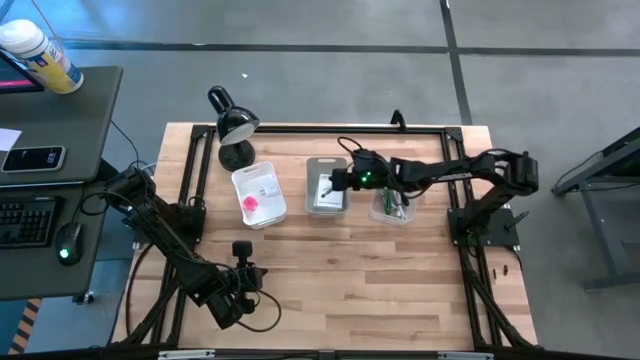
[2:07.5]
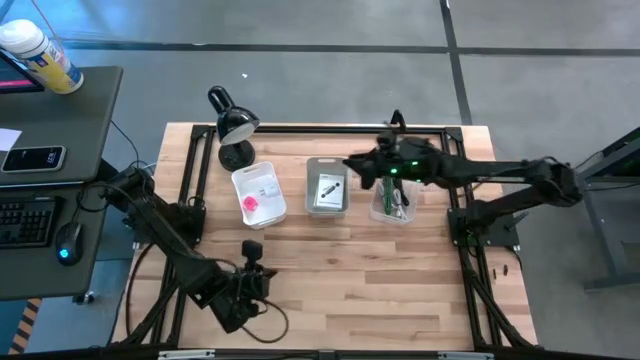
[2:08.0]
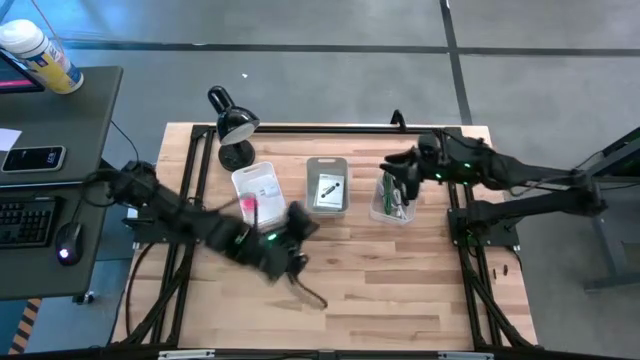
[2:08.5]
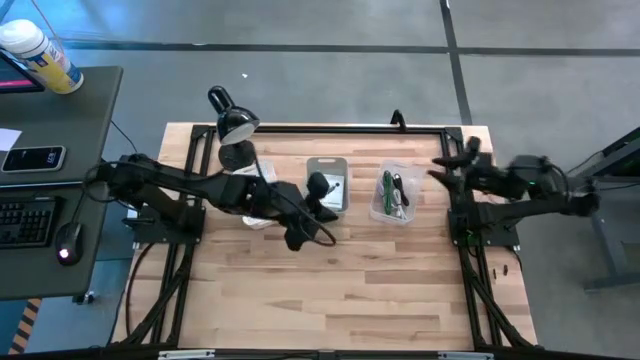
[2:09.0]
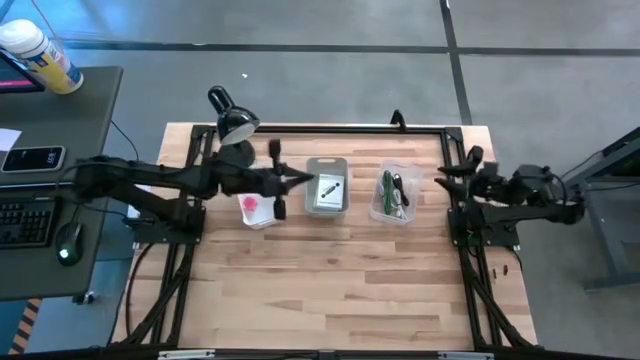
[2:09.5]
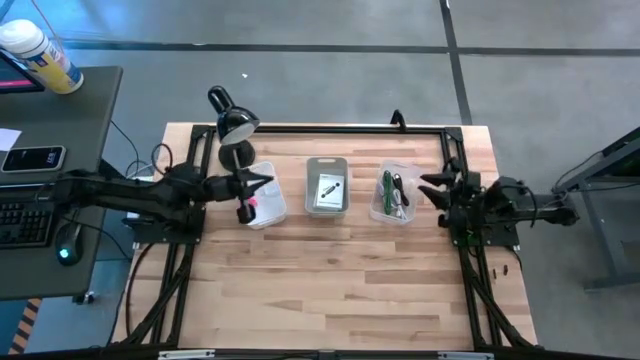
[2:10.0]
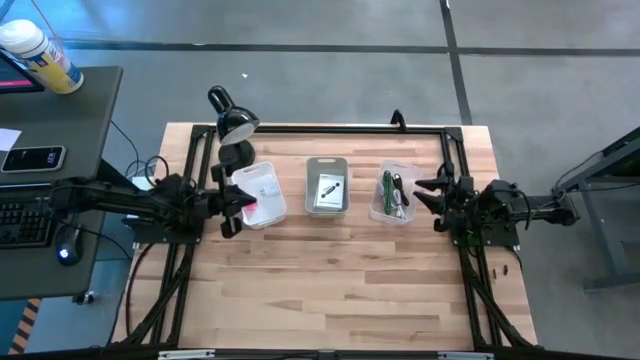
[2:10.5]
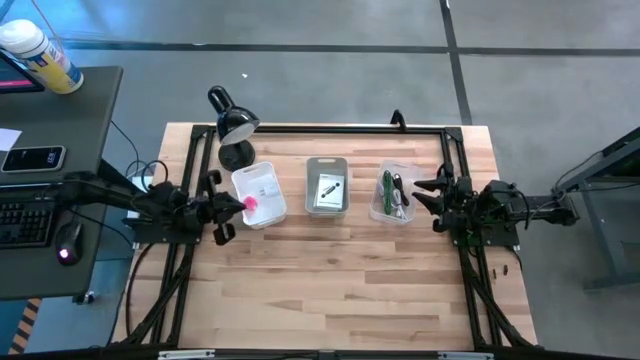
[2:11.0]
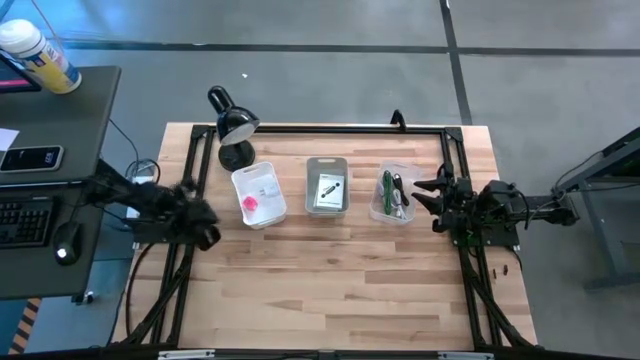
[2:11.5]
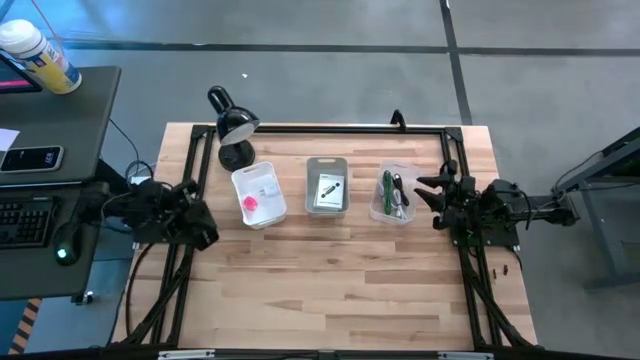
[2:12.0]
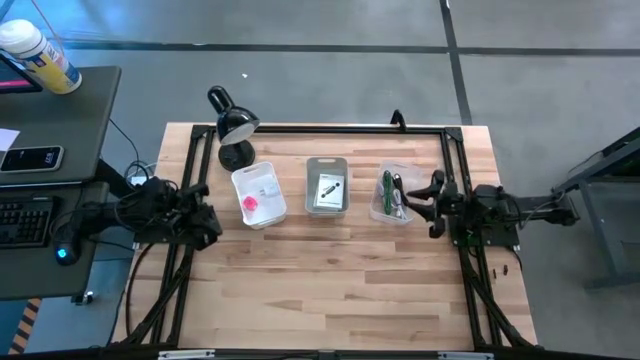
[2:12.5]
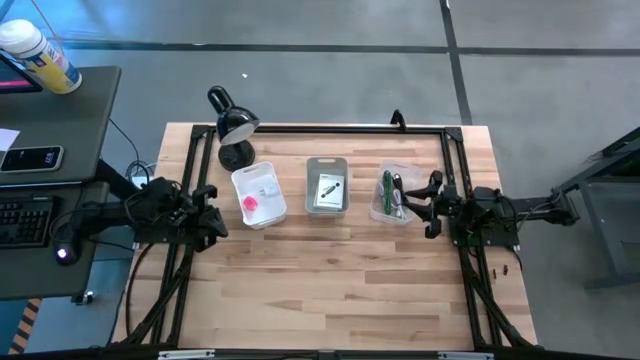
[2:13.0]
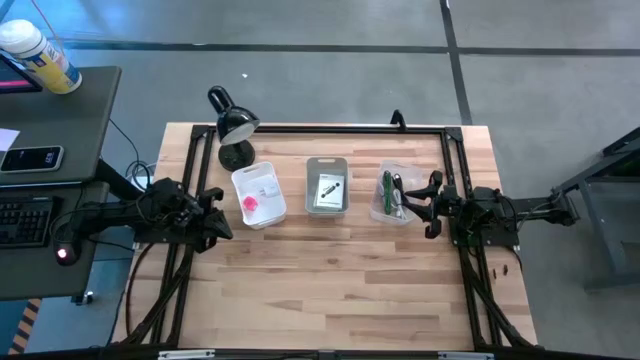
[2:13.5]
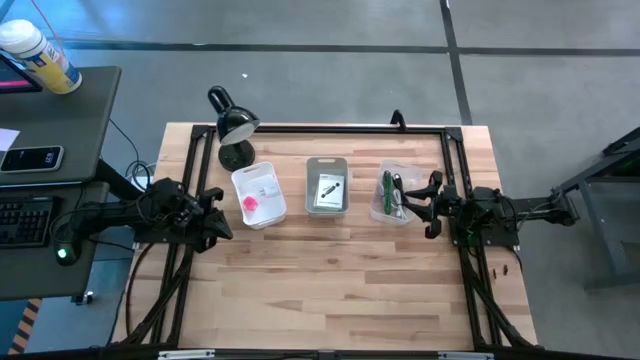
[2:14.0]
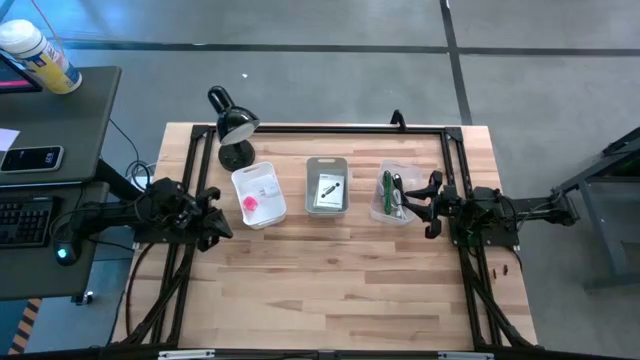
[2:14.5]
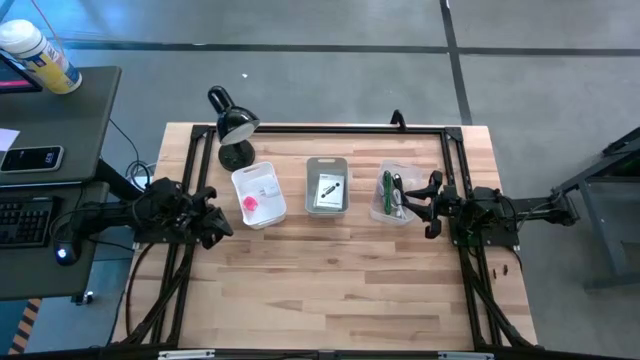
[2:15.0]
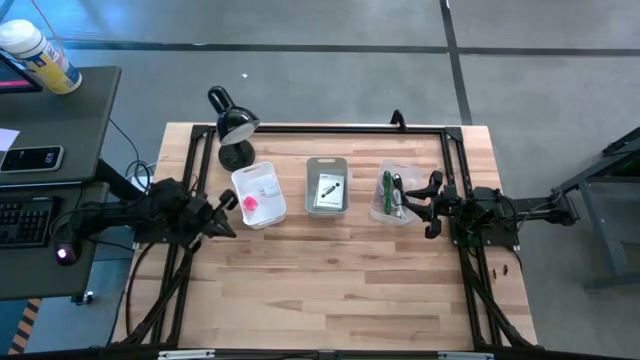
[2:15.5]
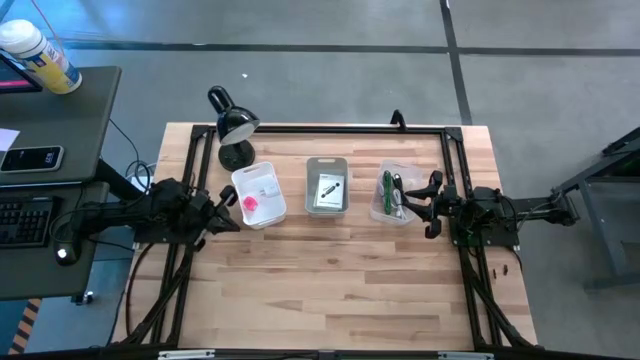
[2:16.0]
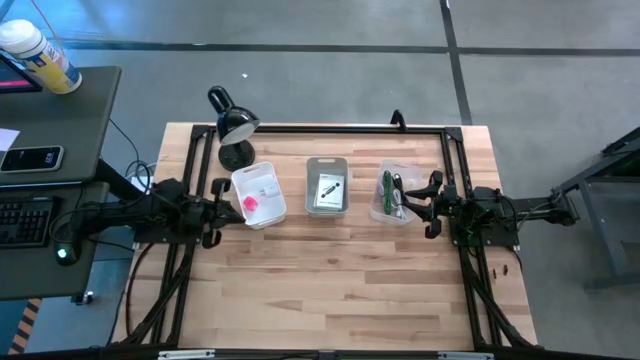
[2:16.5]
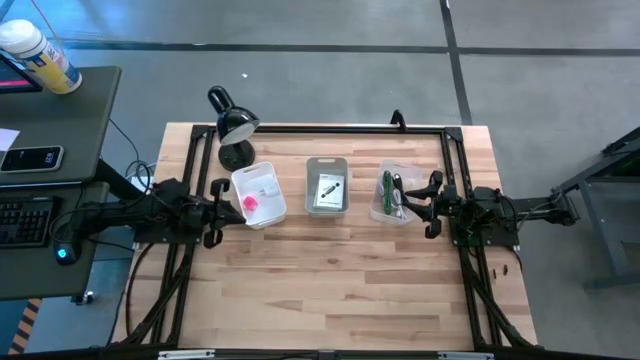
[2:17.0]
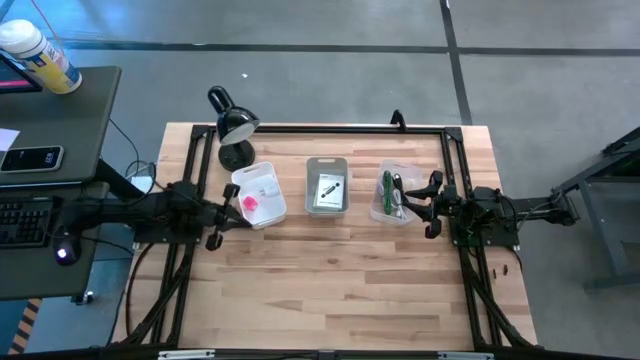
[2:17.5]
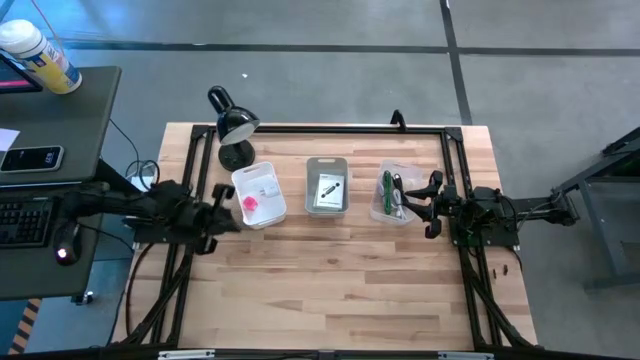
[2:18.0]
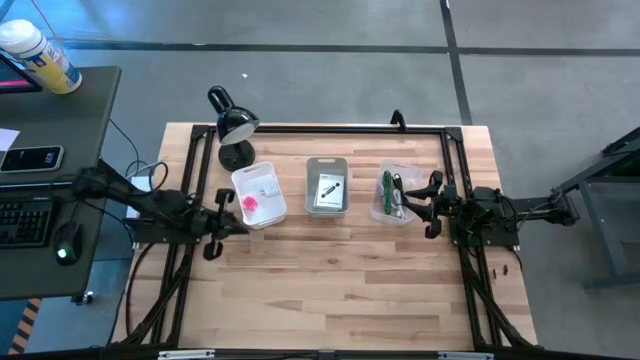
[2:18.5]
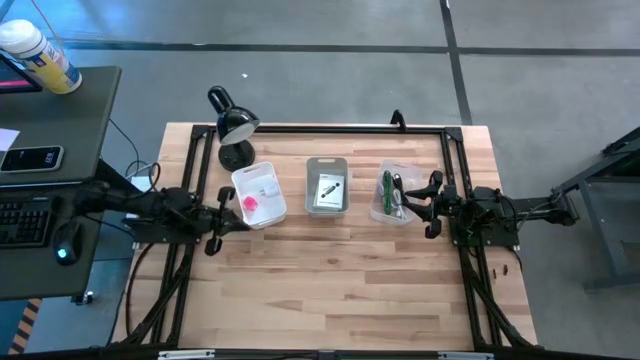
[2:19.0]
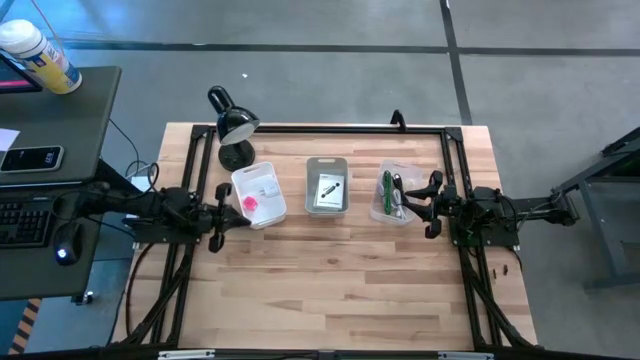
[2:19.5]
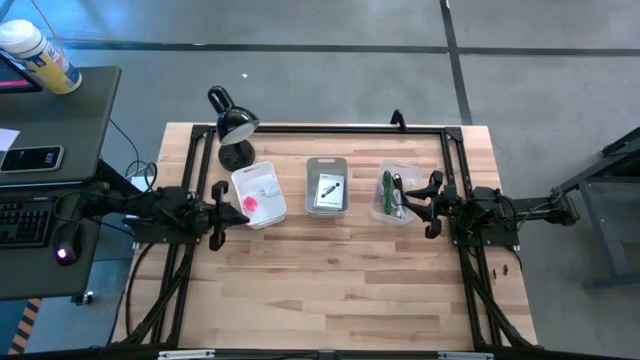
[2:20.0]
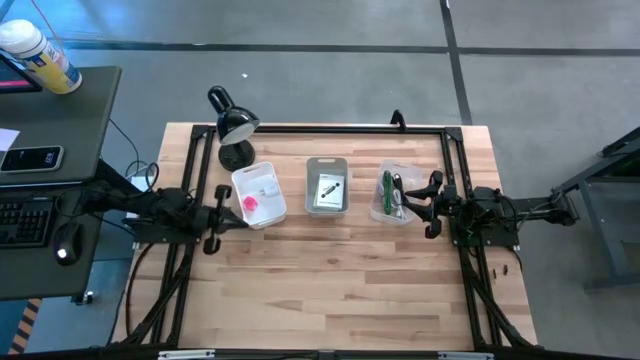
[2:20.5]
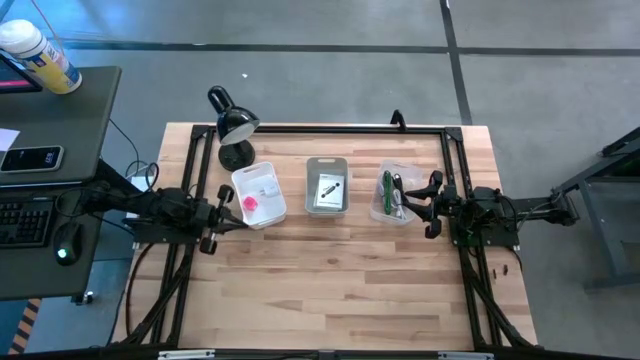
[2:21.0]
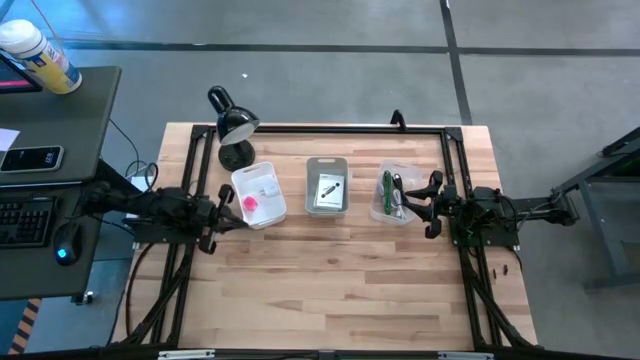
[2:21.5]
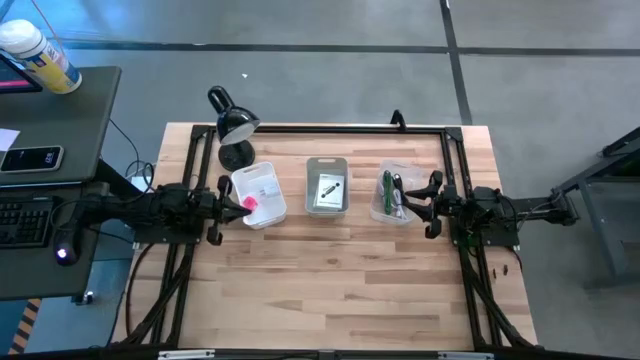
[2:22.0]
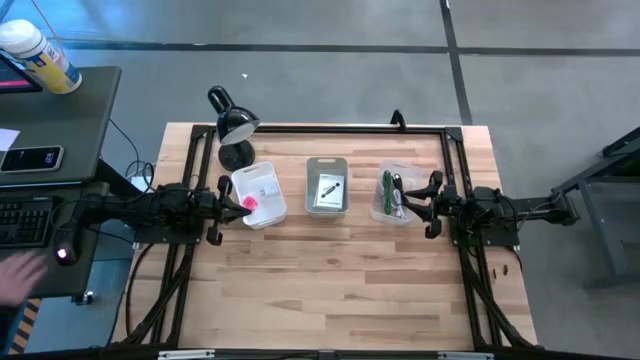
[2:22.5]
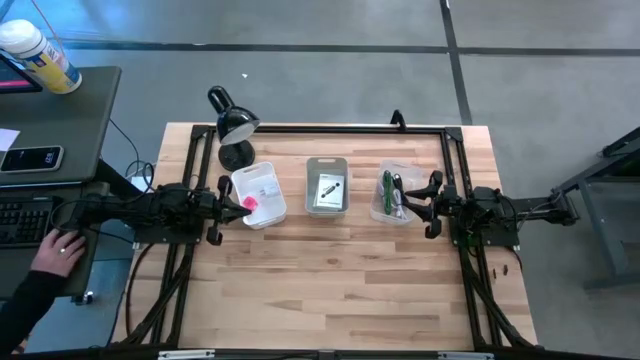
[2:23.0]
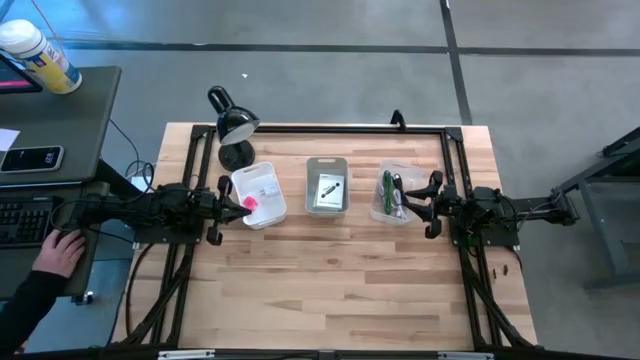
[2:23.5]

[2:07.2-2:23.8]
Task: Pick and place items into bin
Return to home position

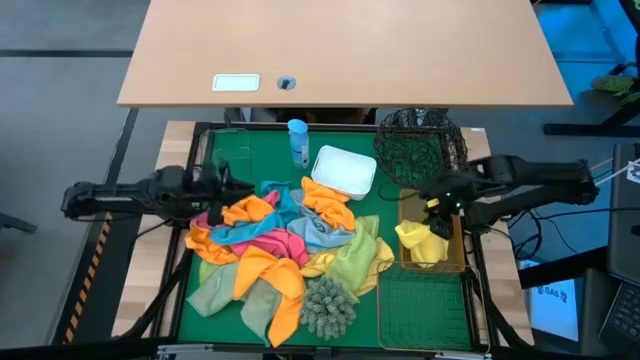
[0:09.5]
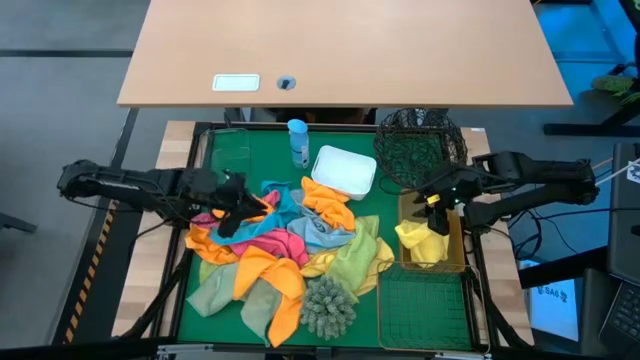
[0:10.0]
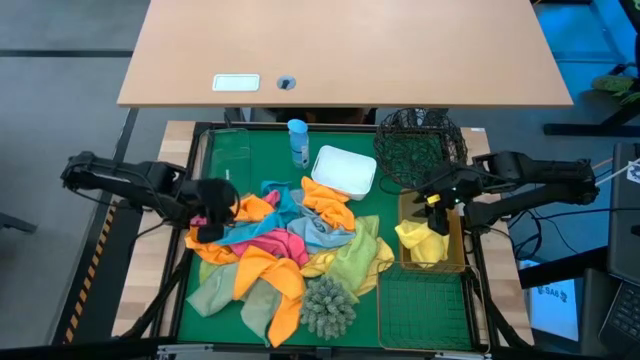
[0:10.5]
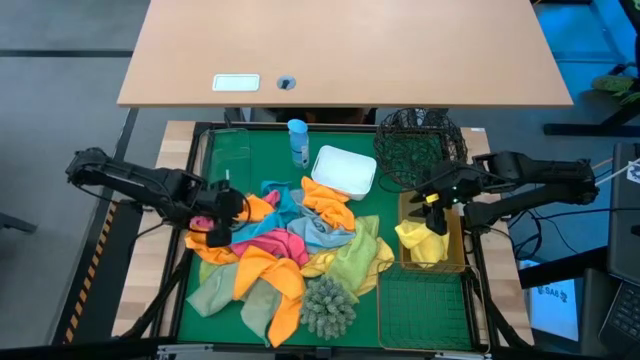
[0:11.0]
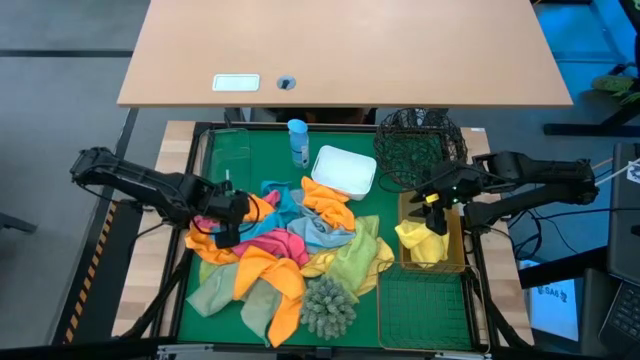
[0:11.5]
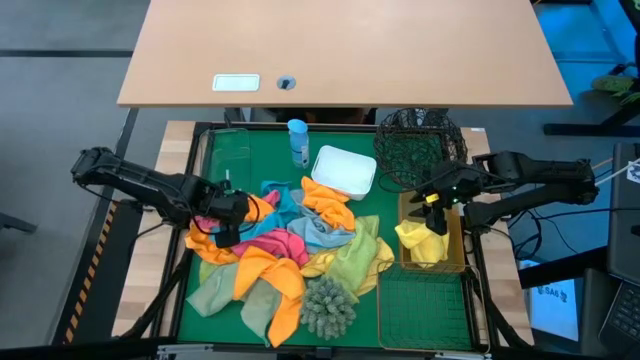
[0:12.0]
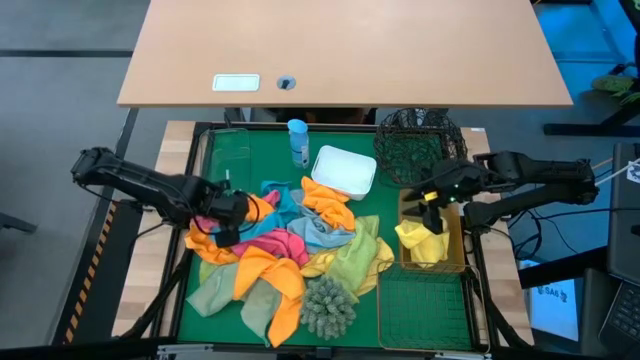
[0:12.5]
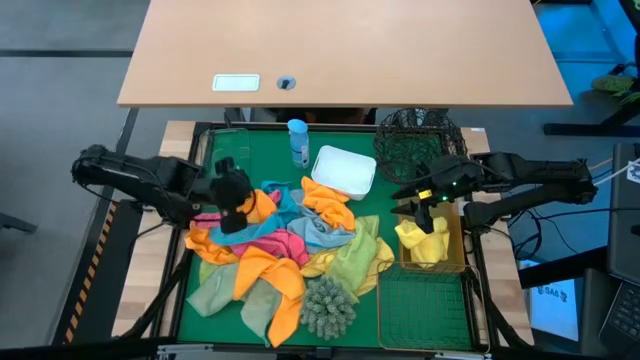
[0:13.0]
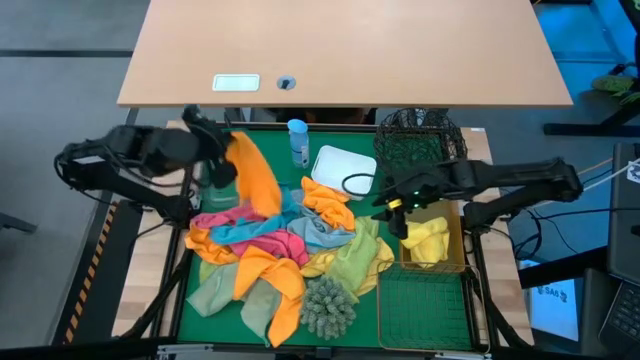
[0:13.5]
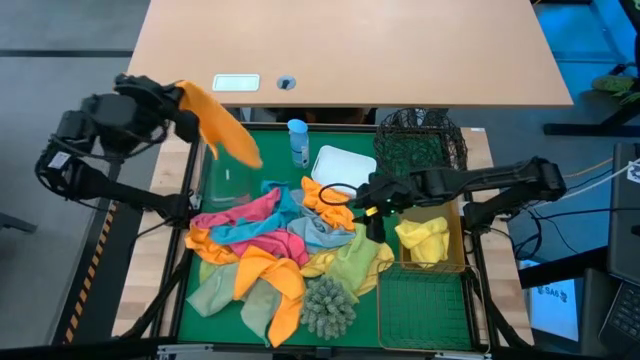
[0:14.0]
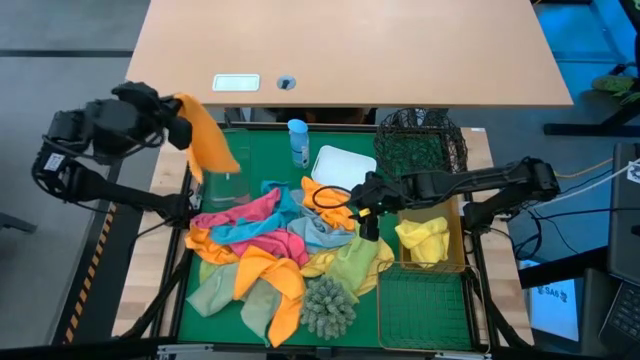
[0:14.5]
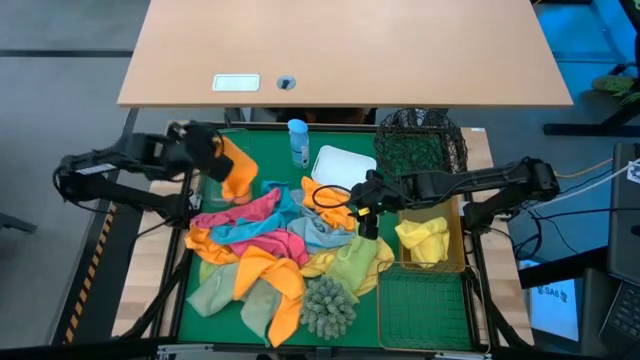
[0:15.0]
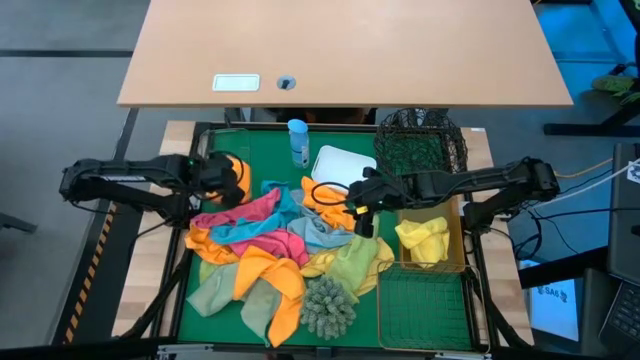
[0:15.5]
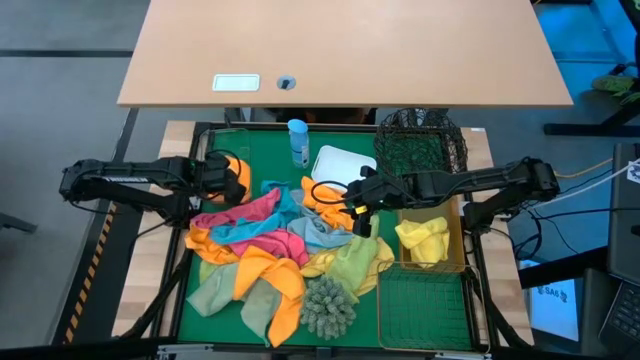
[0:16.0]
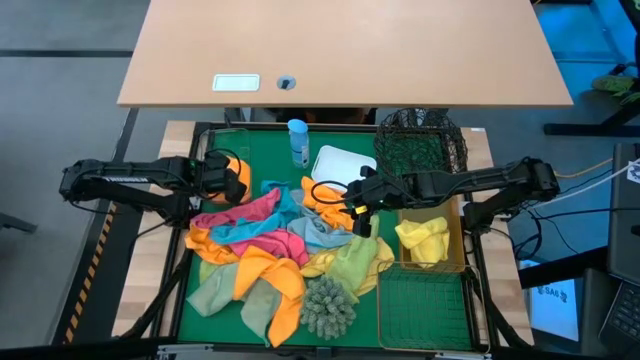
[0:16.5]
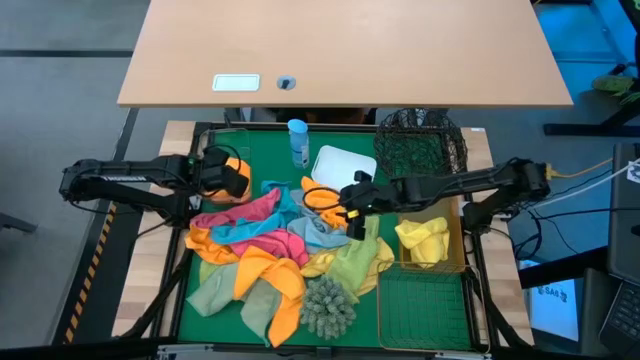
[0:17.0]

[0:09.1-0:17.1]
Task: Sort microfiber towel by color & place in baskets
Put the orange microfiber towel into the transparent bin
